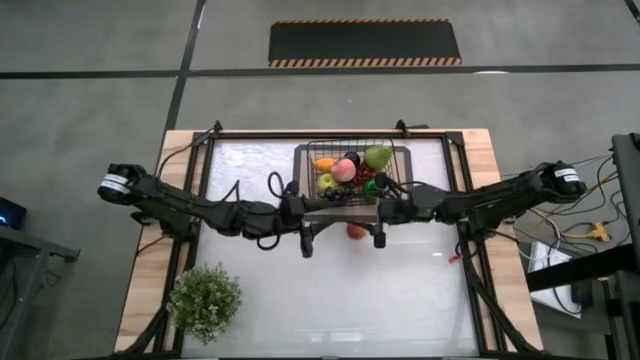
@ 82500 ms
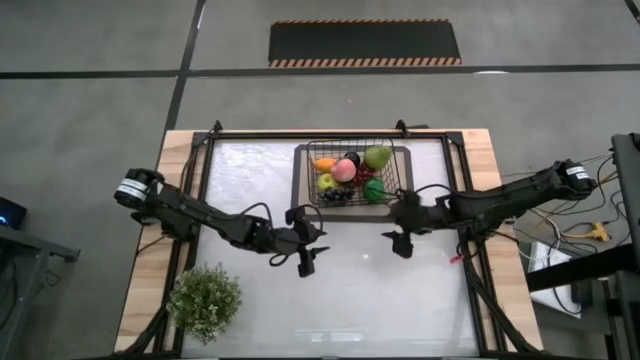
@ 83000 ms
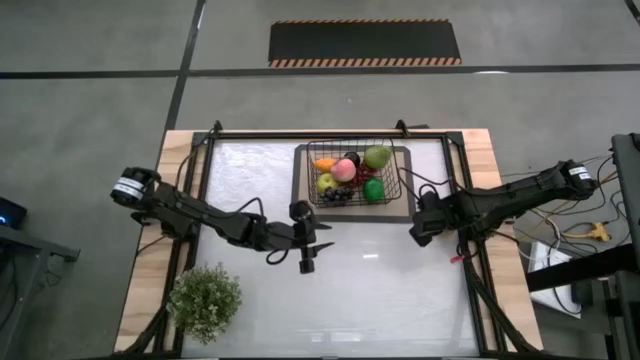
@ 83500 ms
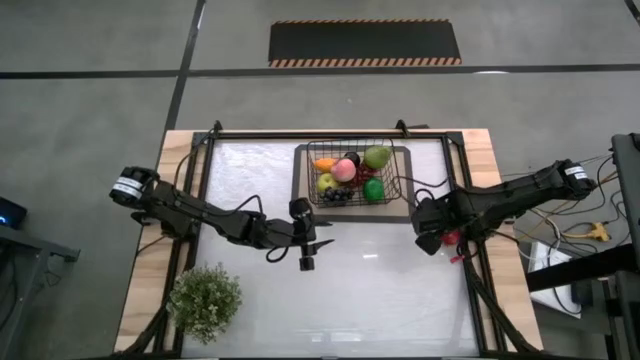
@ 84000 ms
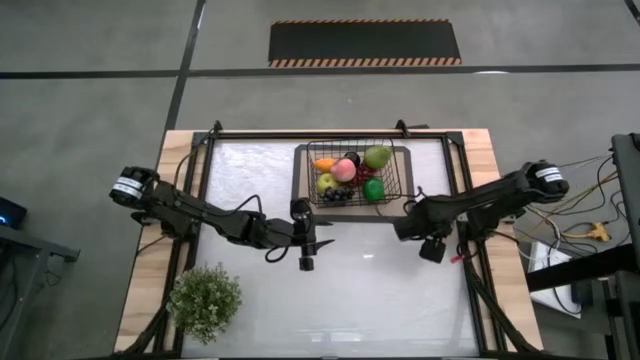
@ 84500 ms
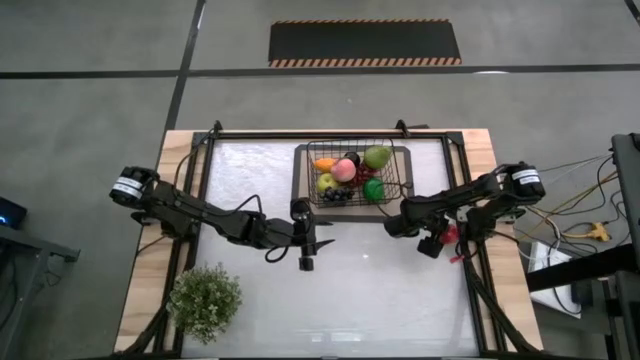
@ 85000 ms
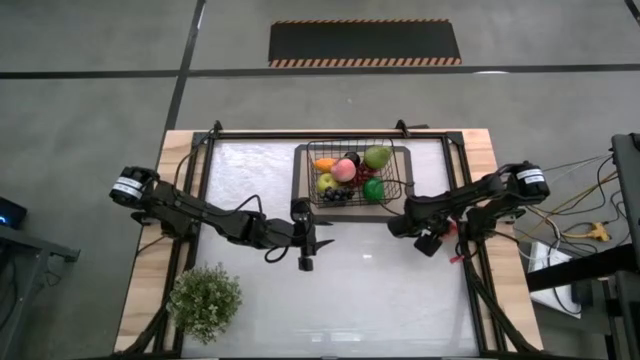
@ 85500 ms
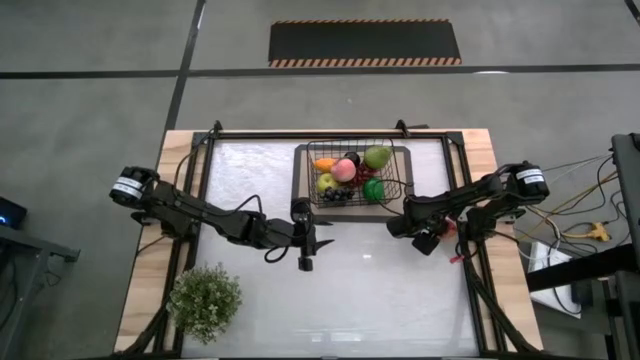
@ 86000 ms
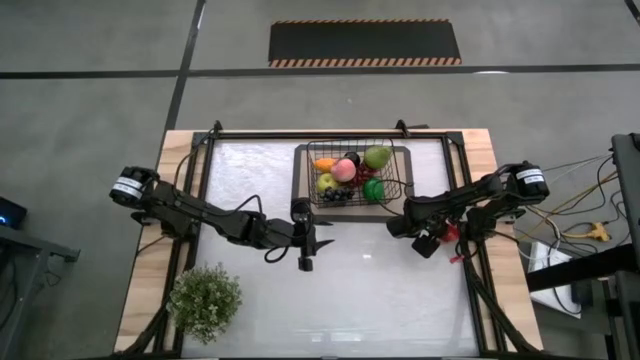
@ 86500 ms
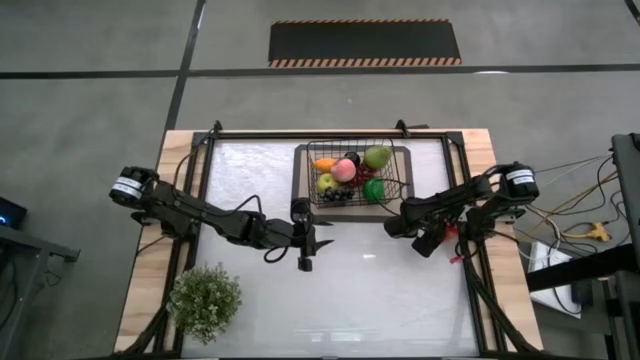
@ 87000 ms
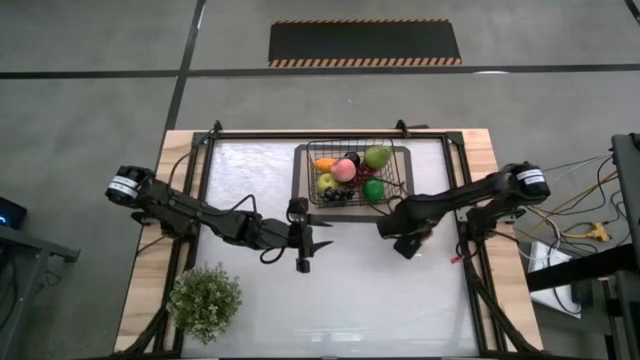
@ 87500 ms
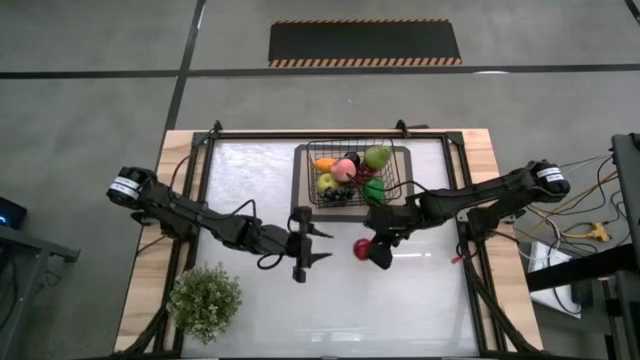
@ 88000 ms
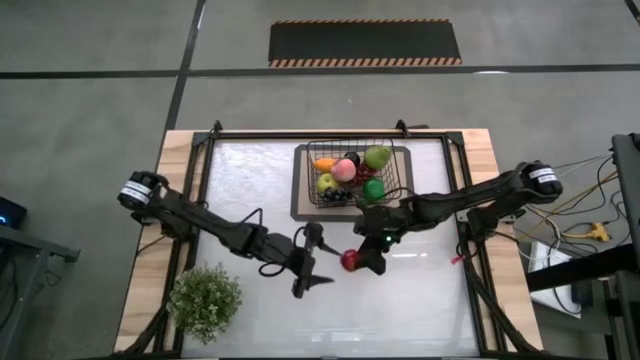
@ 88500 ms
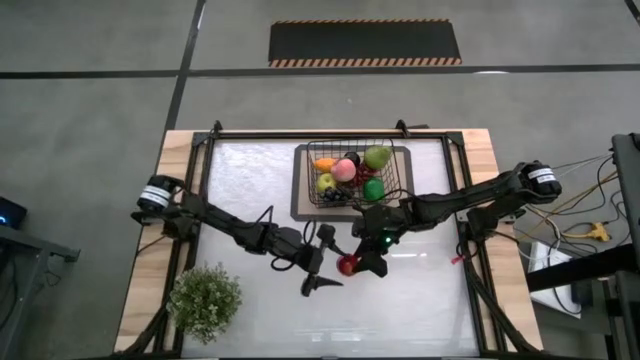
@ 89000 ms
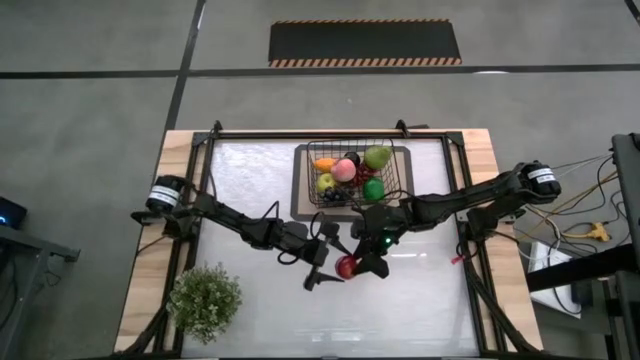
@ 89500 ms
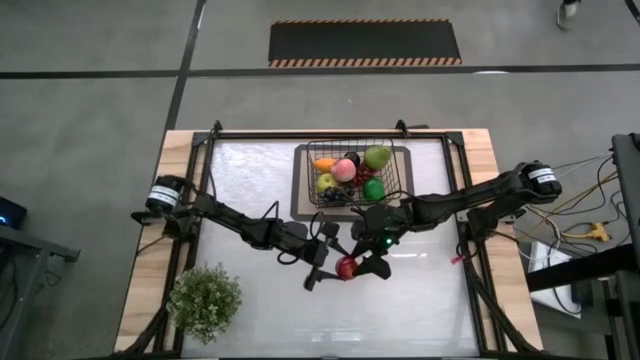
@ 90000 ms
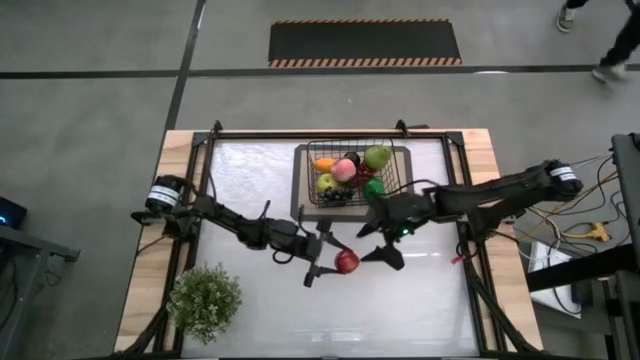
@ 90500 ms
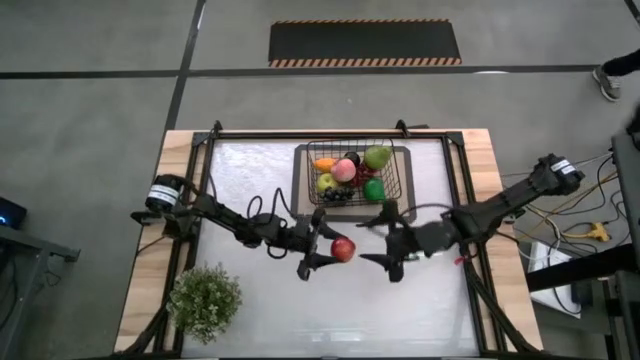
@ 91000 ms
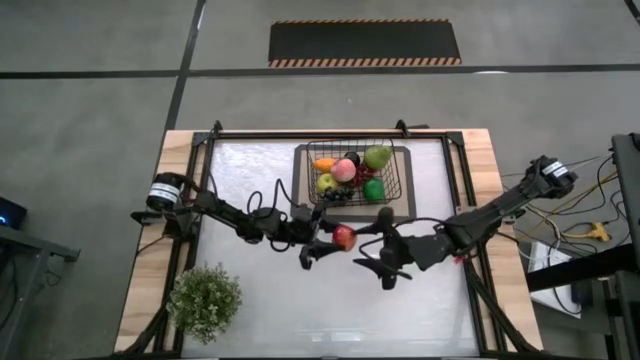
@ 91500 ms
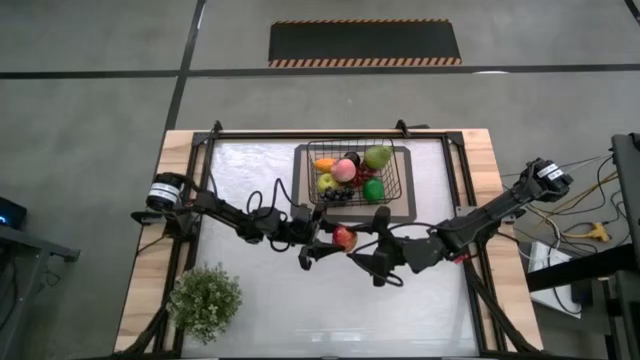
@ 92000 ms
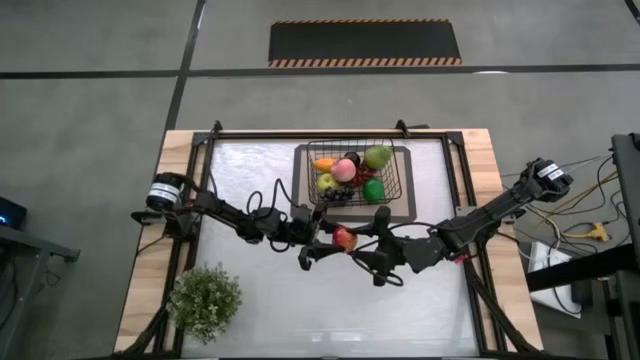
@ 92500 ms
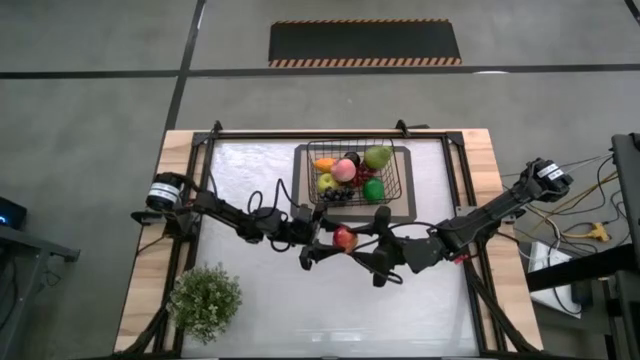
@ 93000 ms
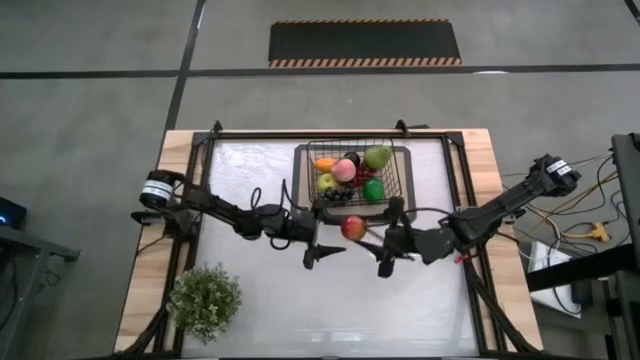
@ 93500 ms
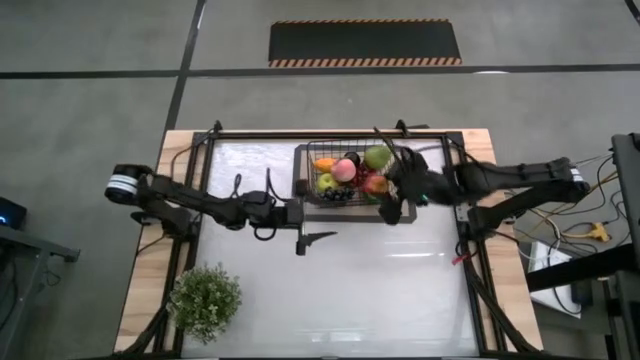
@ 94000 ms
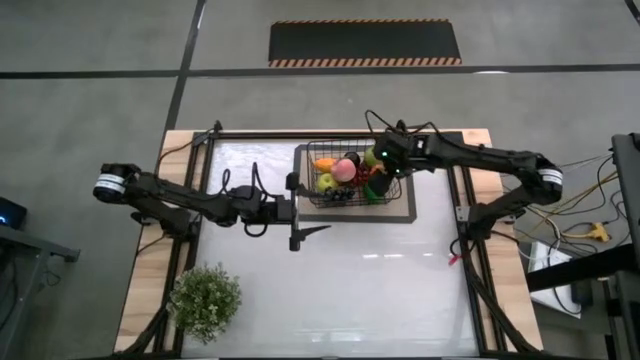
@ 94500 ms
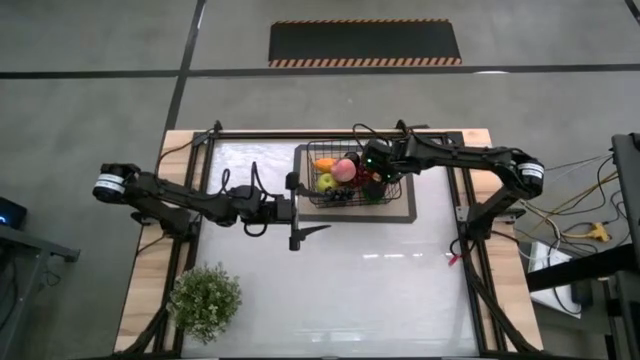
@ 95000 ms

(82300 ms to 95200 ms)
Task: Build produce basket
Put the red apple into the black wire basket

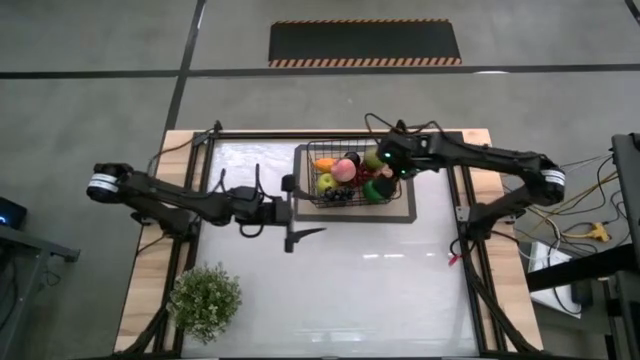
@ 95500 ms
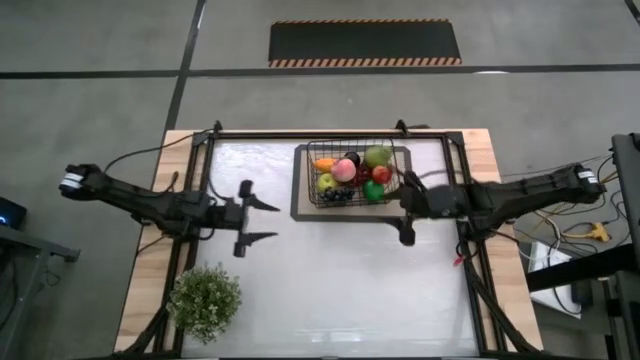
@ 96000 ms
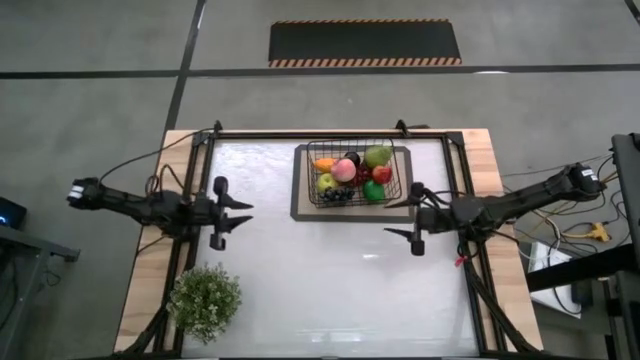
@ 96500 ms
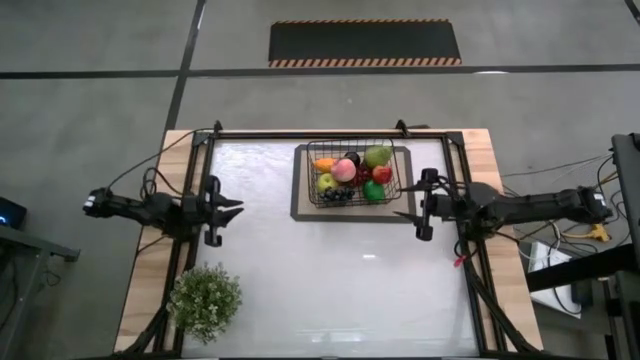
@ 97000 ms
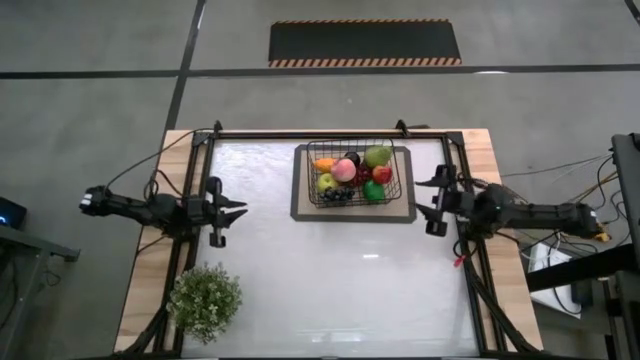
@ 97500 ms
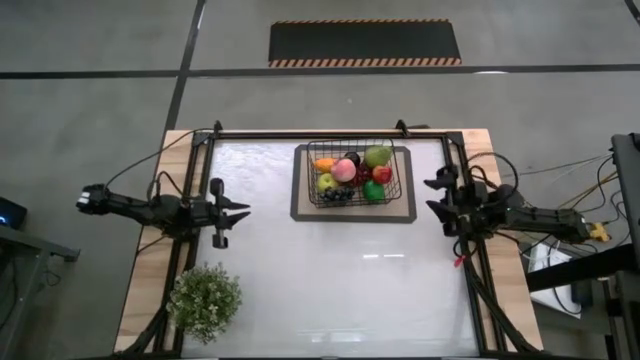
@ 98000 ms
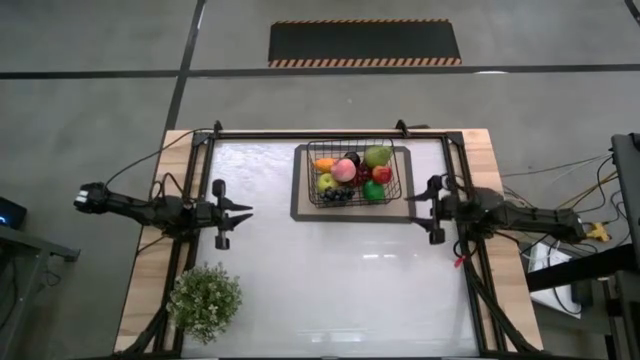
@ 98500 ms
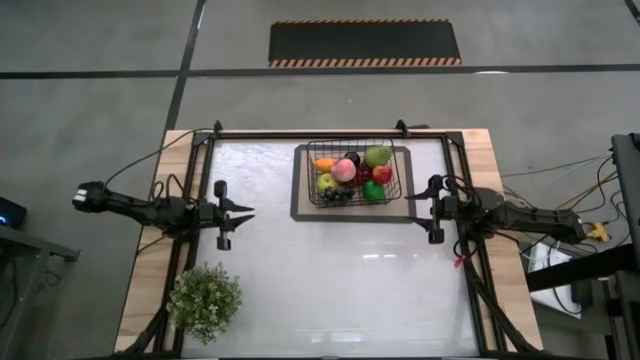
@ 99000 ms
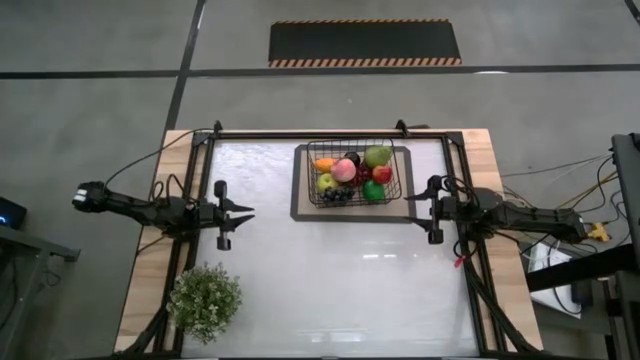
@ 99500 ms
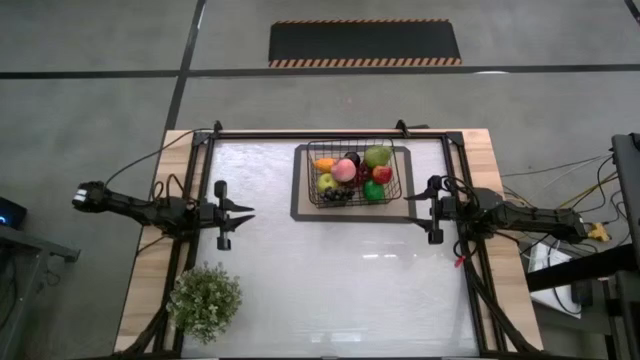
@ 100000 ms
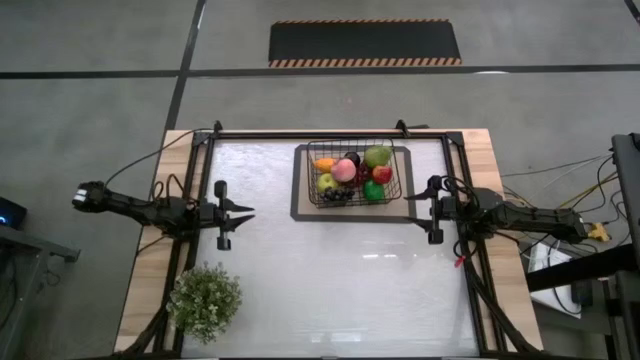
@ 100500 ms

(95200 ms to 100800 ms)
Return to Home Position

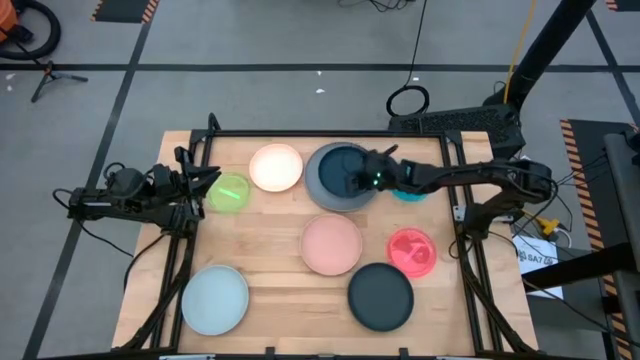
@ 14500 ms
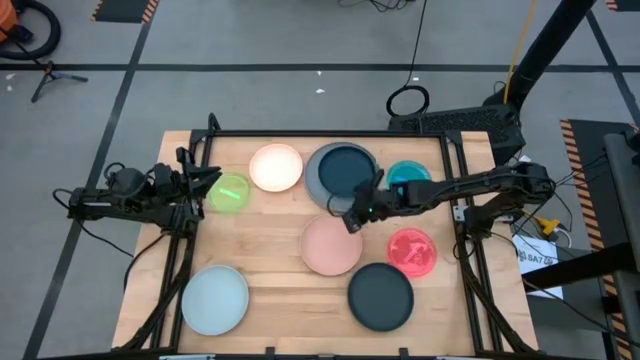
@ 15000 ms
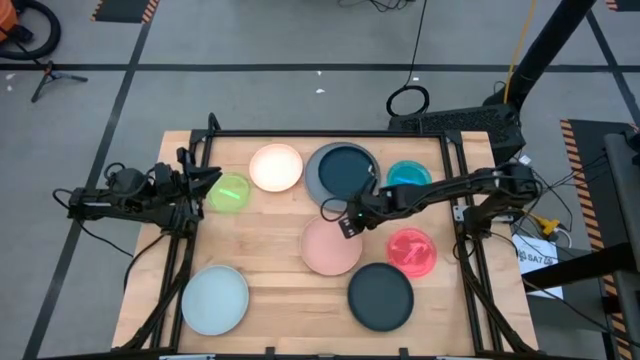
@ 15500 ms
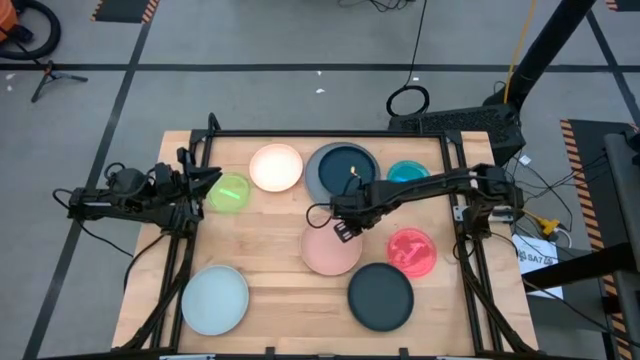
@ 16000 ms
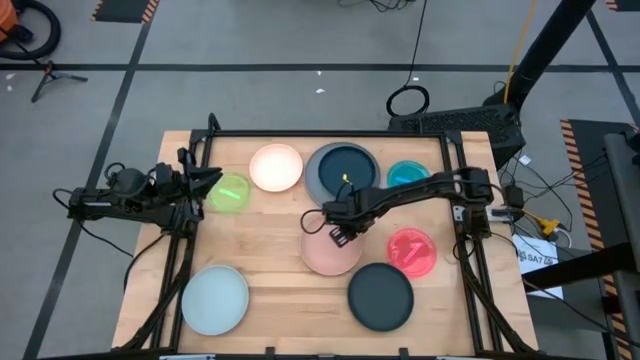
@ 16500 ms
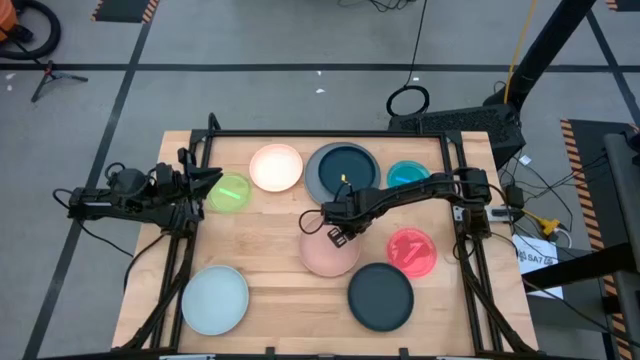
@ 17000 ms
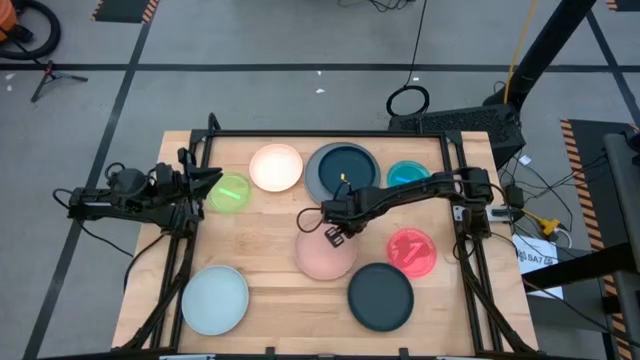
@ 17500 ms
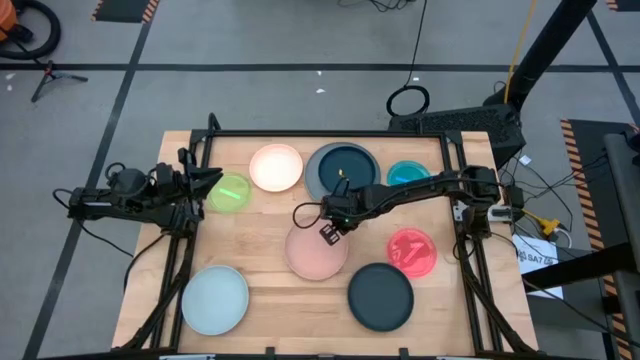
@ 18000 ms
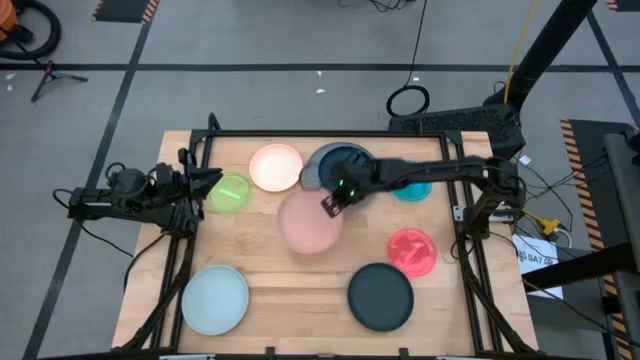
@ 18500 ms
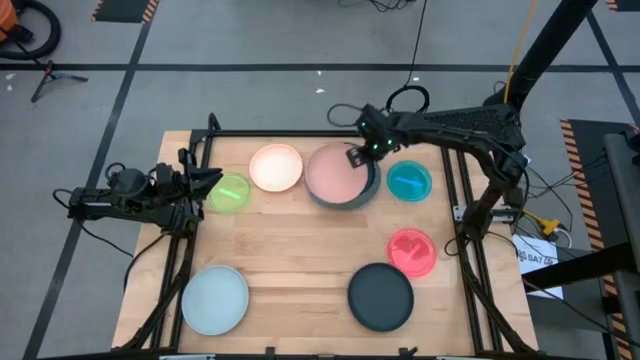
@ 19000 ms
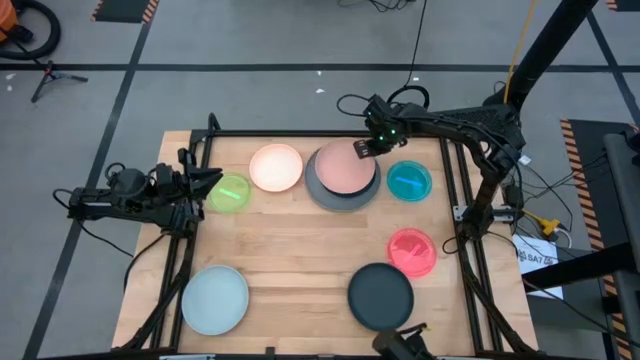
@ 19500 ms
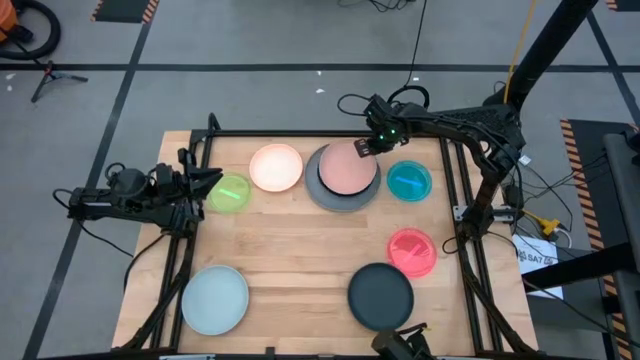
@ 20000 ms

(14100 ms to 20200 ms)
Task: Stack plastic plates
Stack the pink plate on top of the dark blue plate
